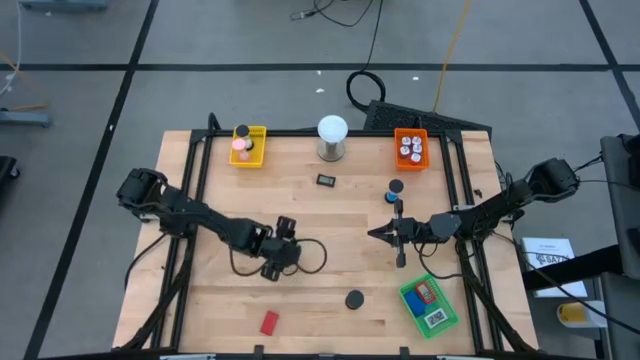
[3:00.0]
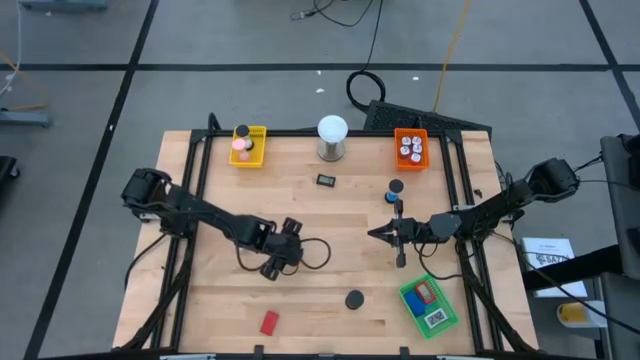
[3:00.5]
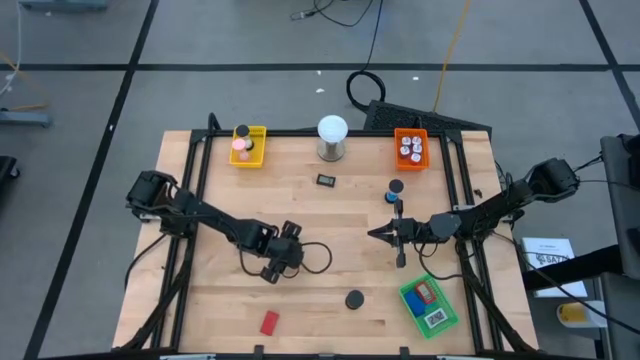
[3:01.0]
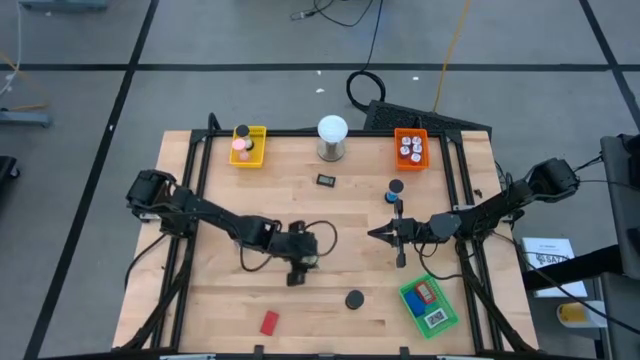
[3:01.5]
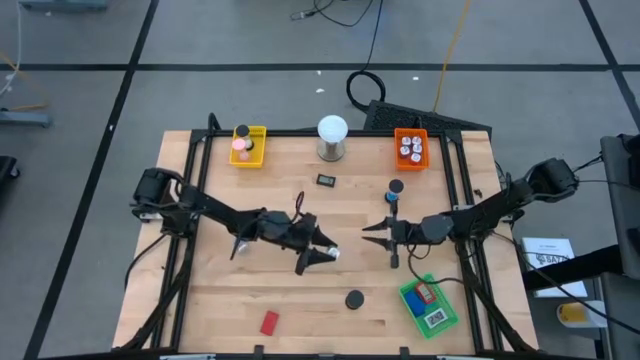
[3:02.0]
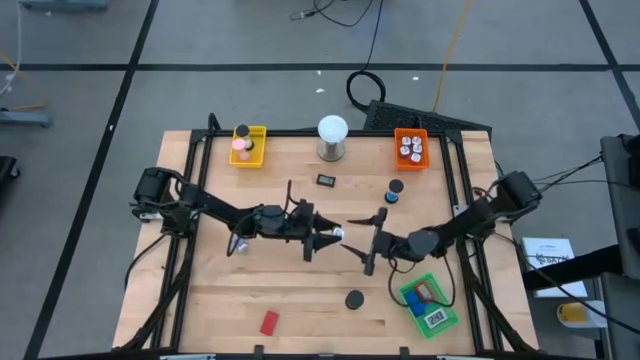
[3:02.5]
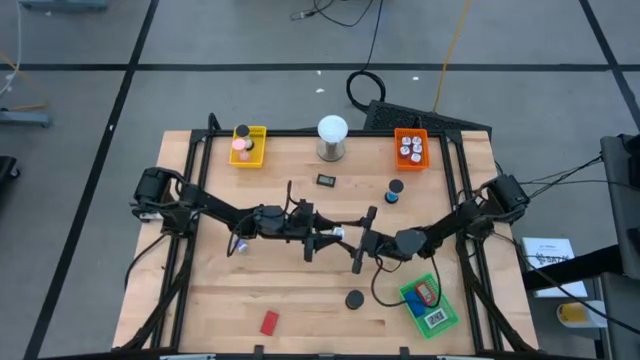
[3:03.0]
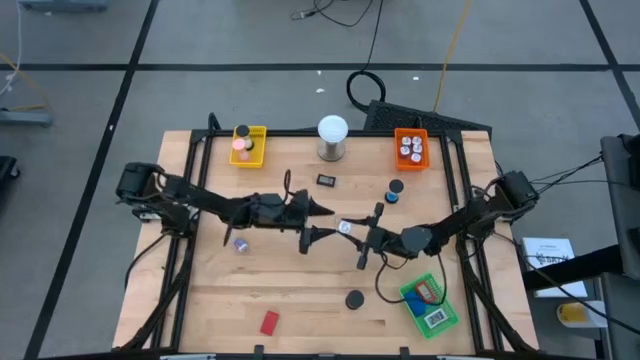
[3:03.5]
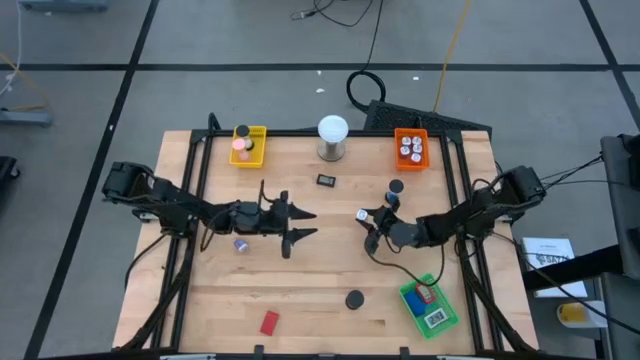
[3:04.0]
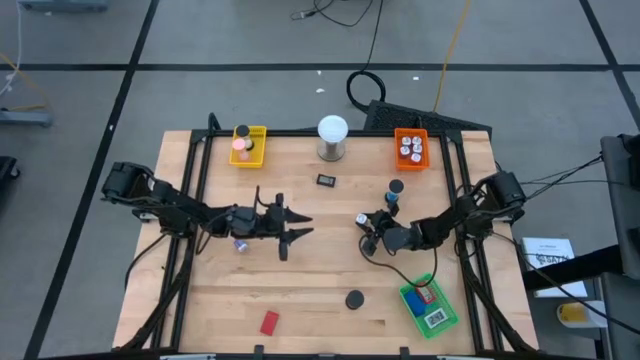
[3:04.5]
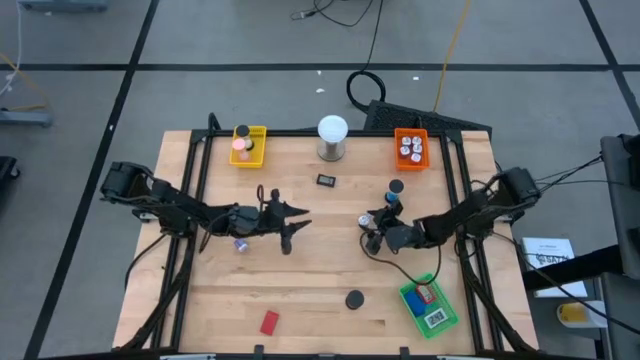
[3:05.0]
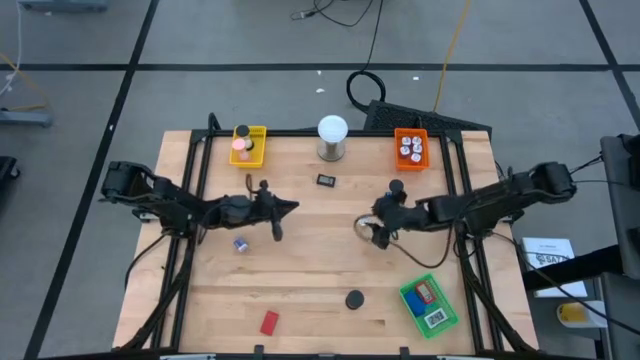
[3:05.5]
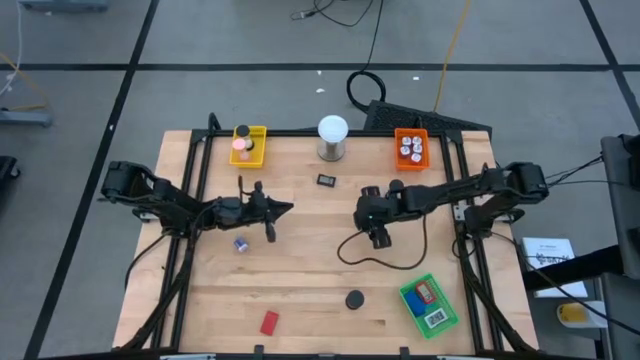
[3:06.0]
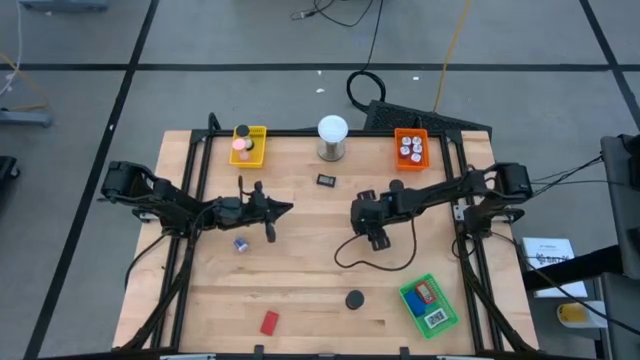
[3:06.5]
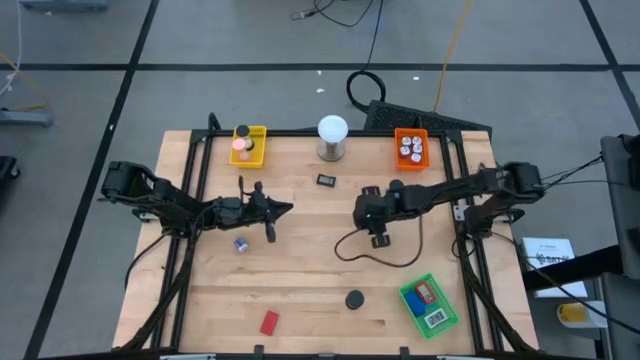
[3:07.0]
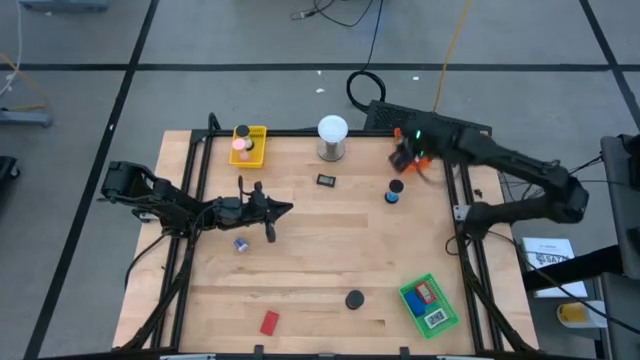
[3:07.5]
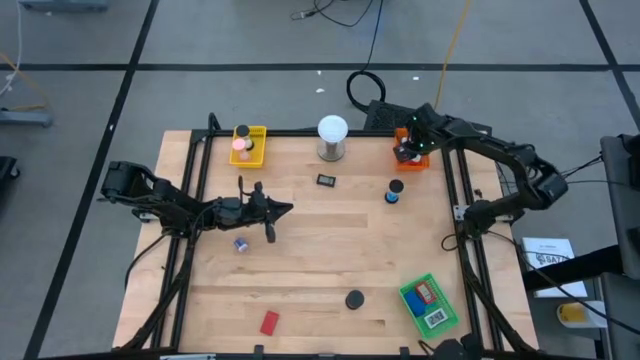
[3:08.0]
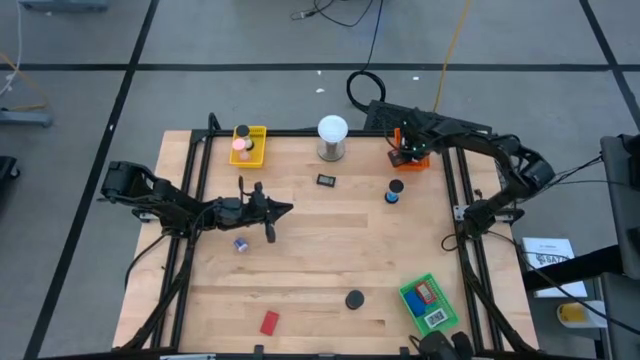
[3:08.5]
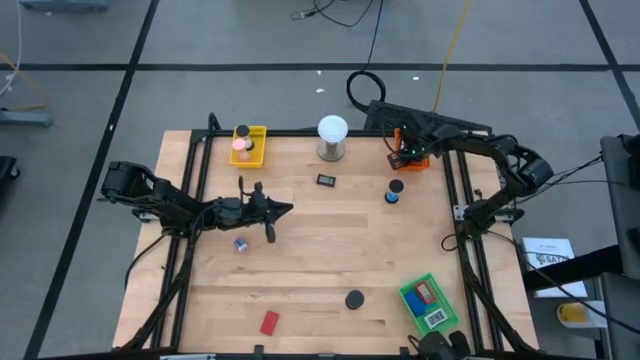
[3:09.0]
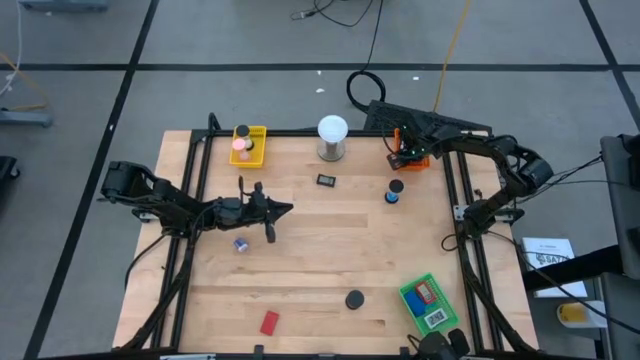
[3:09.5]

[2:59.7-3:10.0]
Task: Pick & Place Office items
Put the green charger adaptor into the orange bin

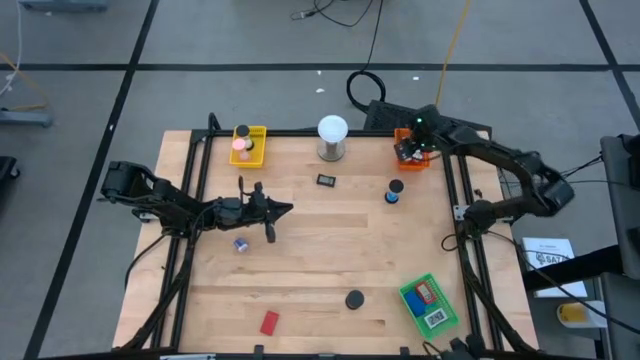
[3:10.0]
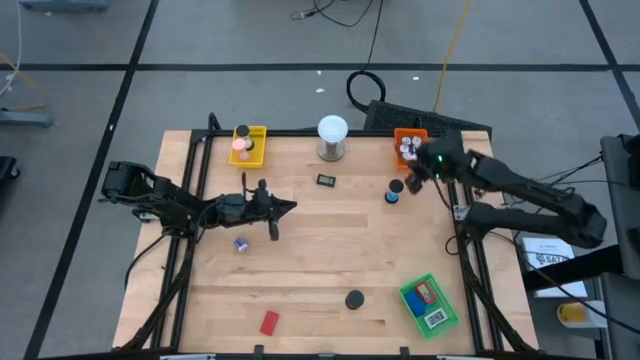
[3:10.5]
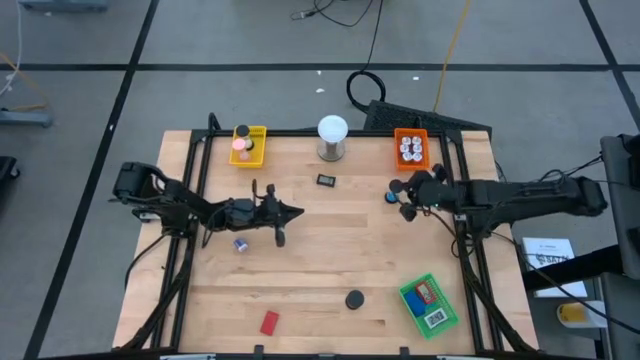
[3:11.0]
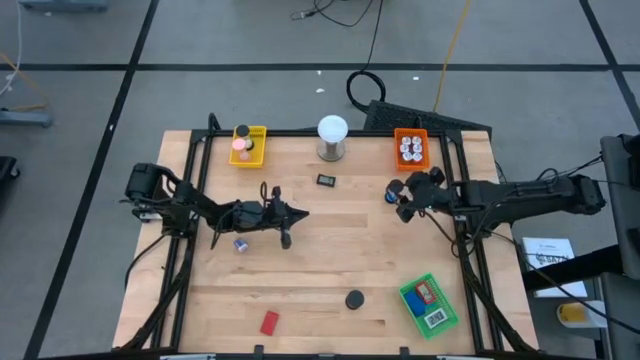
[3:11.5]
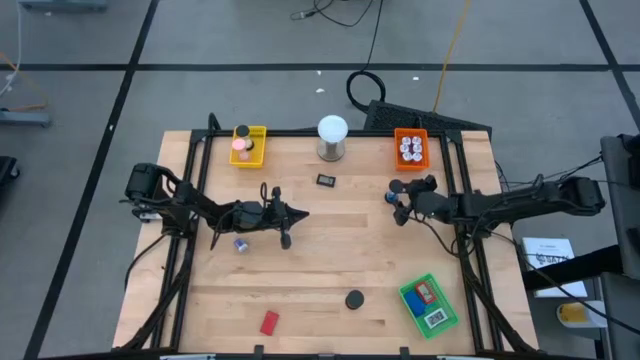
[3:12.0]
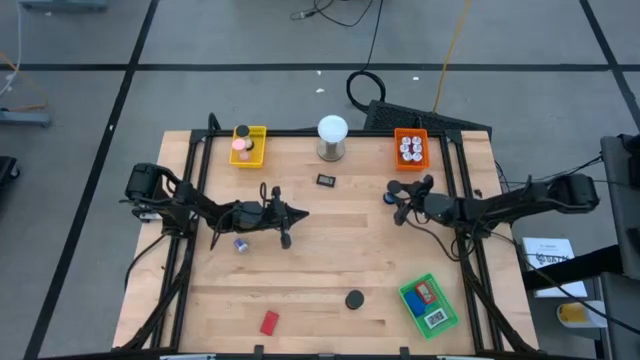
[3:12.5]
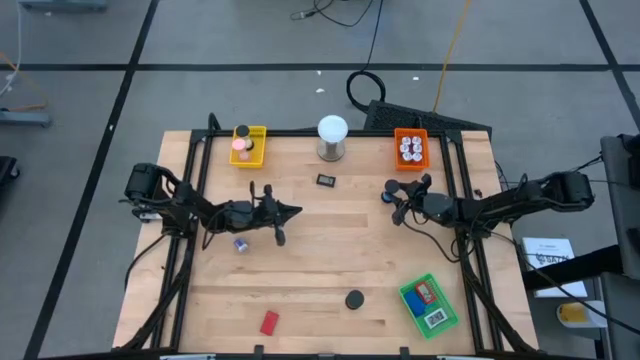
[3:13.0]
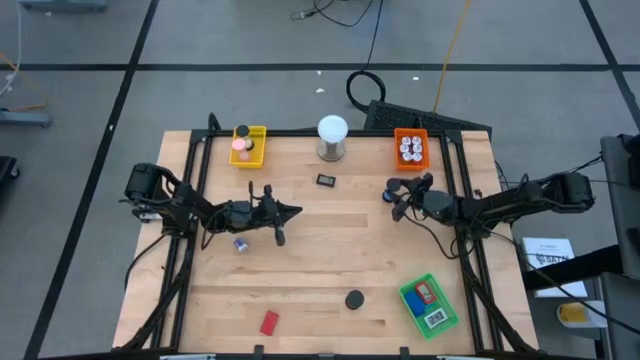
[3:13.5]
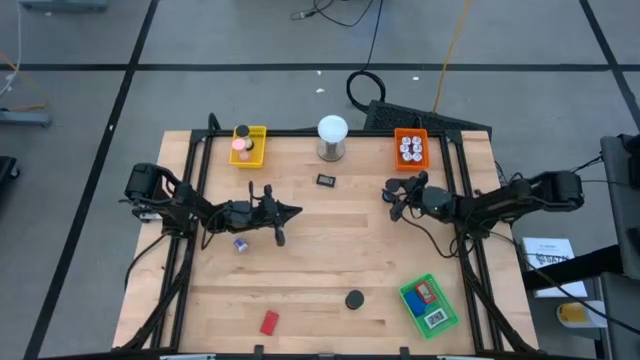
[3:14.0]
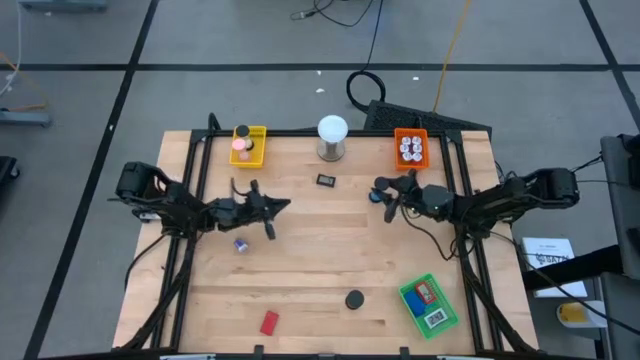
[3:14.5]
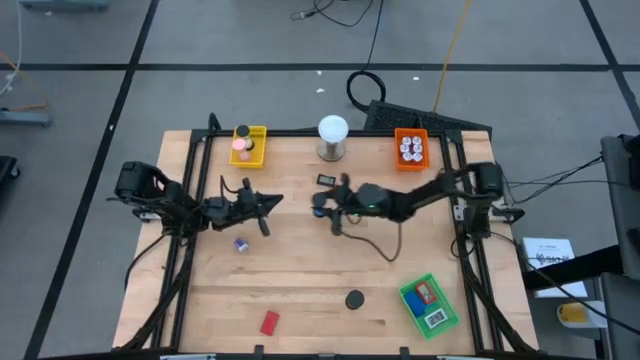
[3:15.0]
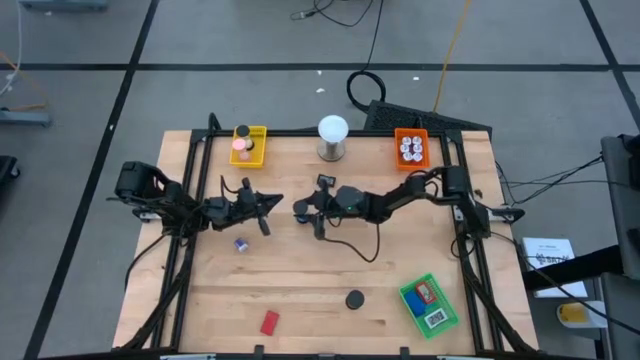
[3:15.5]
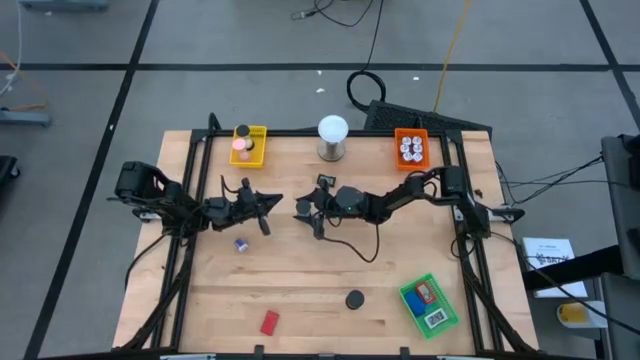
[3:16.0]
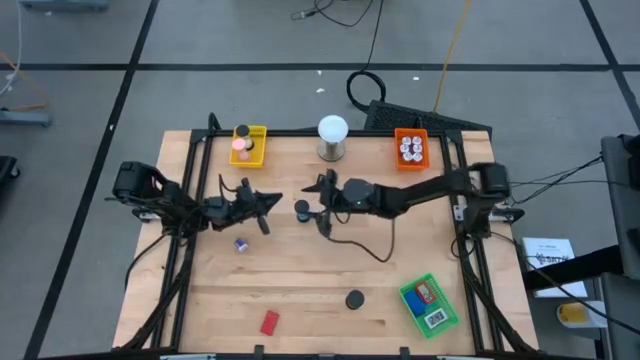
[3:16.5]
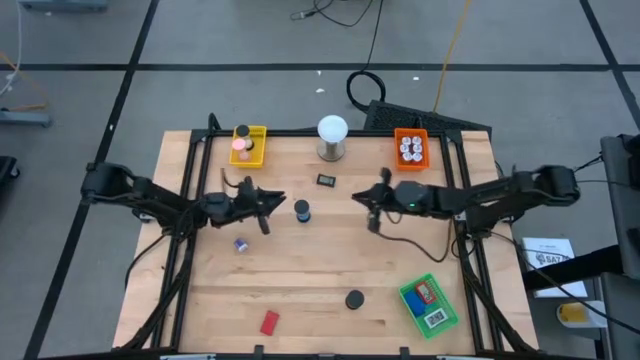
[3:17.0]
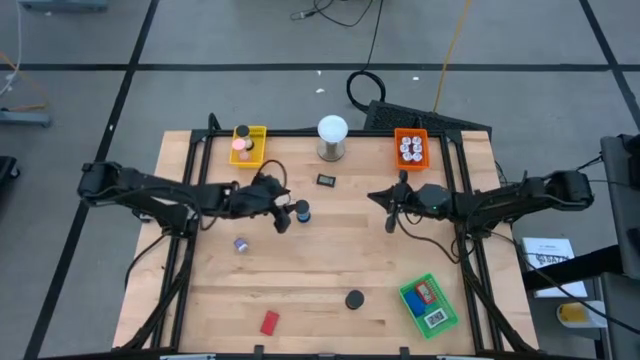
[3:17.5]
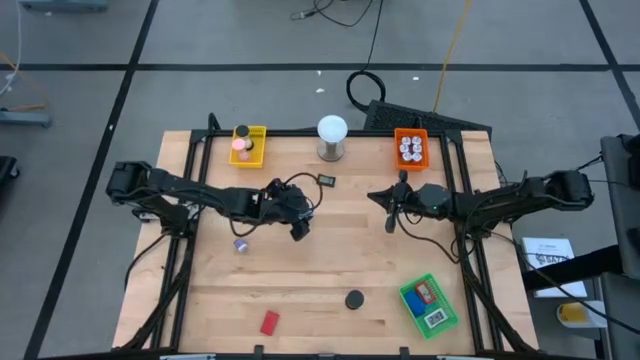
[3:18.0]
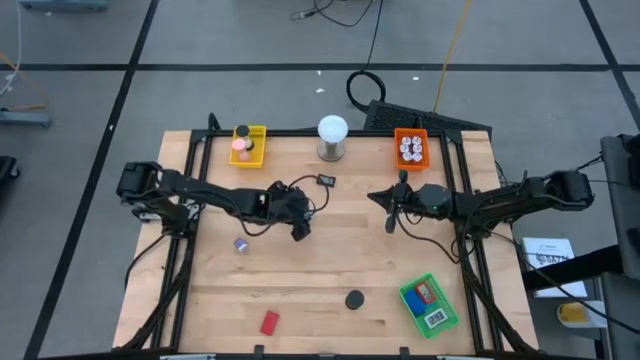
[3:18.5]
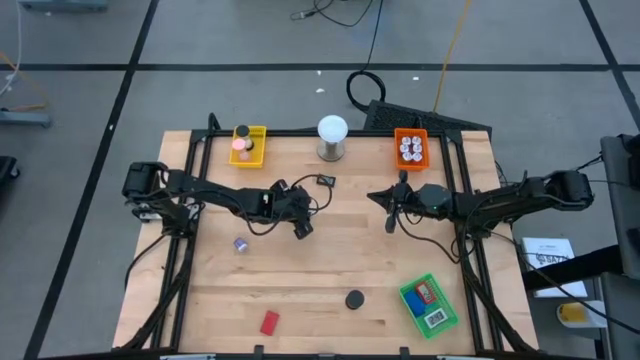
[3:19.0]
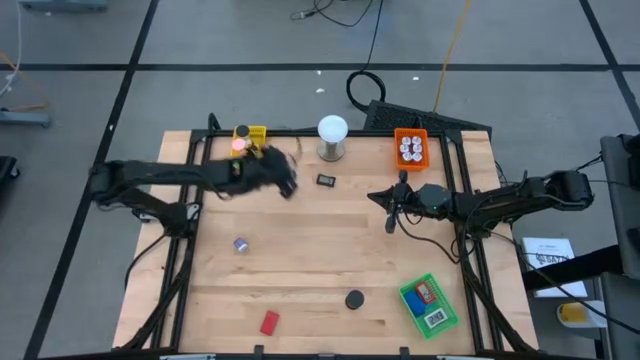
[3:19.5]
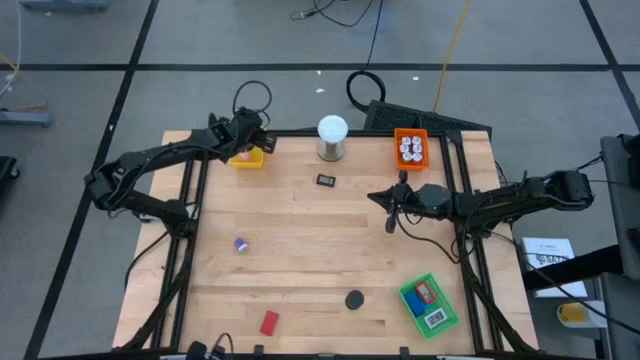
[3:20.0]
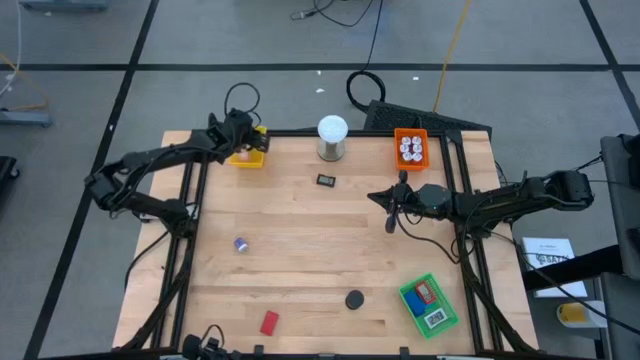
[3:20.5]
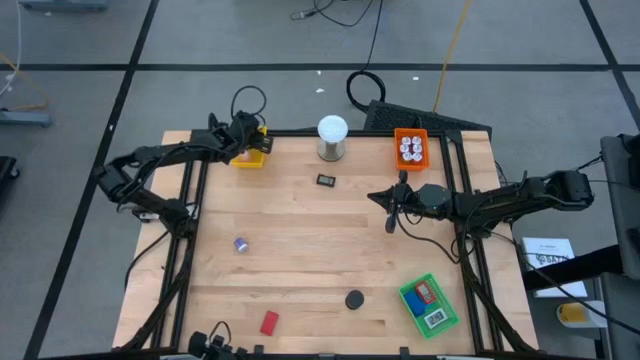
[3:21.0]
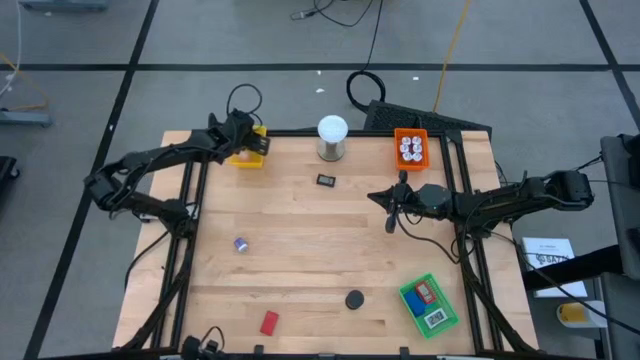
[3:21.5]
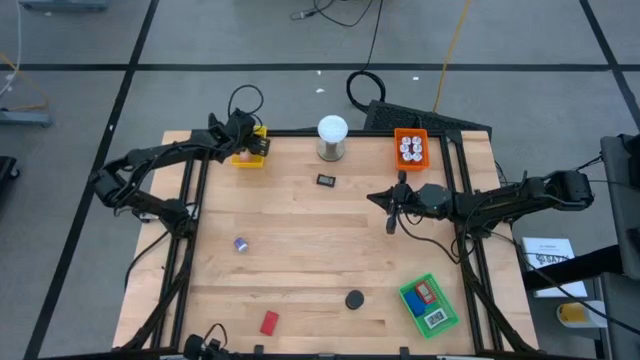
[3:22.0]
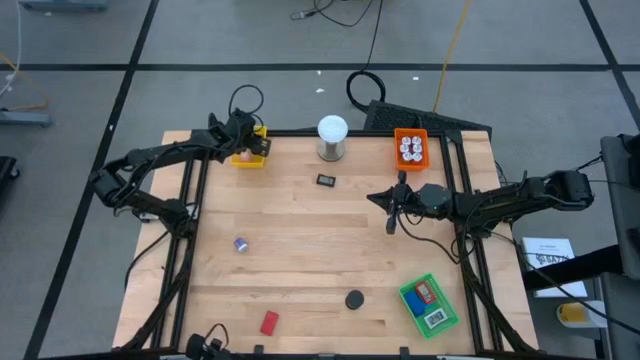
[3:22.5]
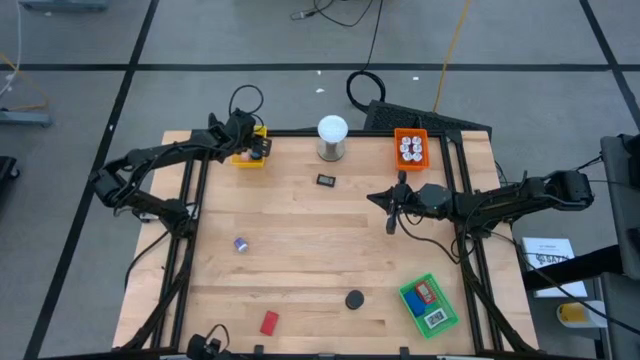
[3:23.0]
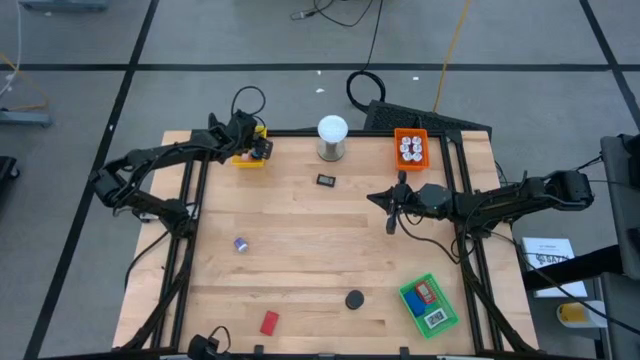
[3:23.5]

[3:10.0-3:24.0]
Put the blue hour glass into the yellow bin
